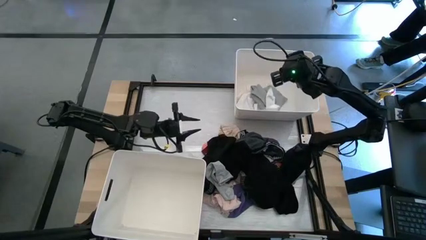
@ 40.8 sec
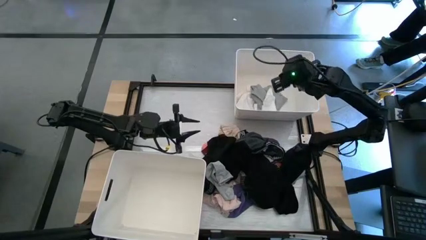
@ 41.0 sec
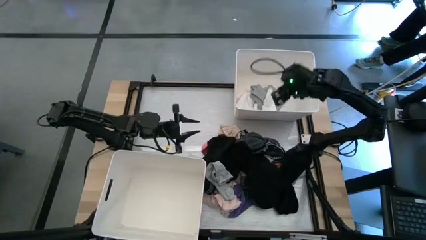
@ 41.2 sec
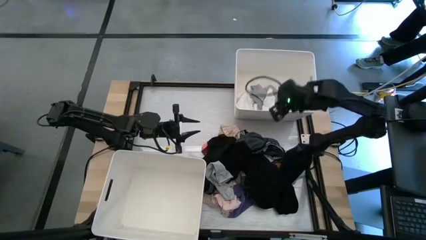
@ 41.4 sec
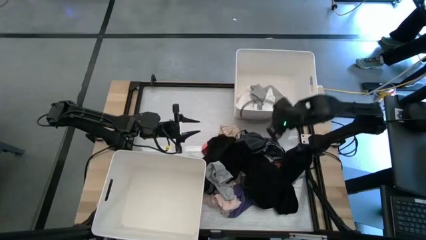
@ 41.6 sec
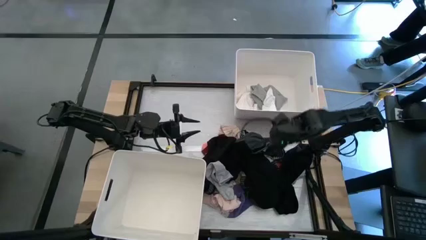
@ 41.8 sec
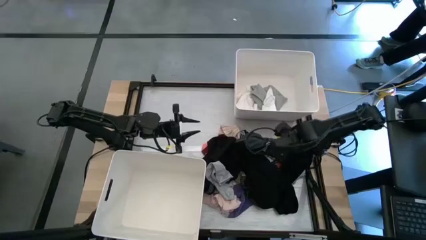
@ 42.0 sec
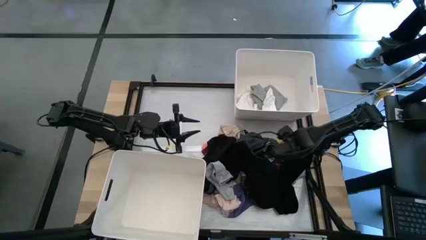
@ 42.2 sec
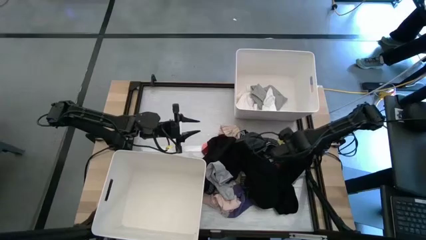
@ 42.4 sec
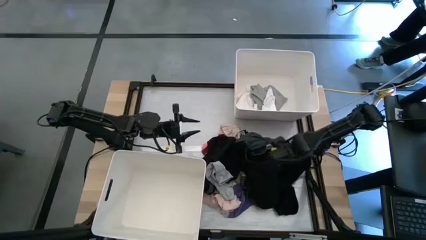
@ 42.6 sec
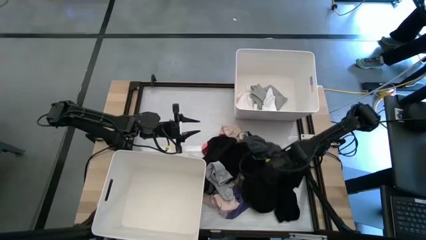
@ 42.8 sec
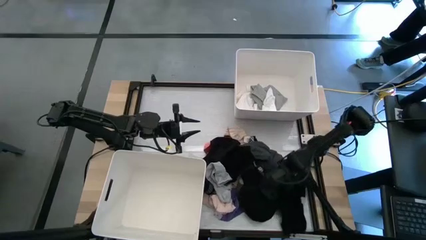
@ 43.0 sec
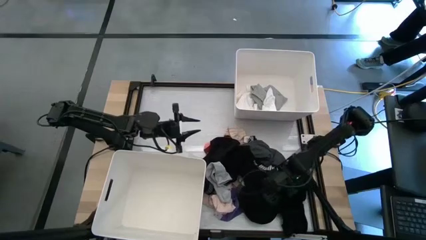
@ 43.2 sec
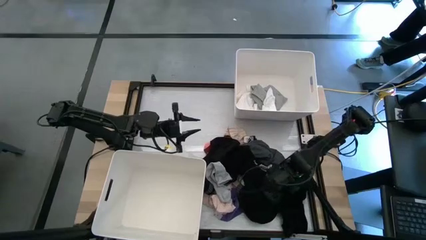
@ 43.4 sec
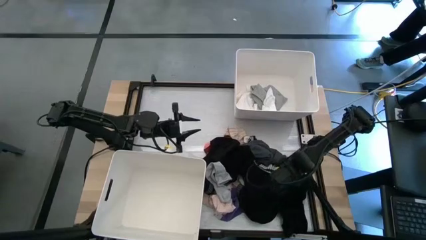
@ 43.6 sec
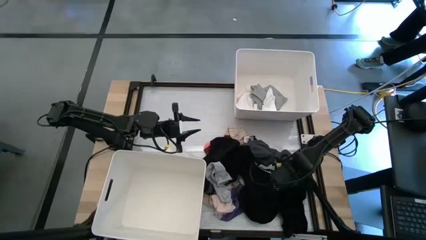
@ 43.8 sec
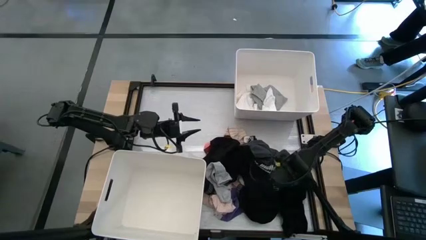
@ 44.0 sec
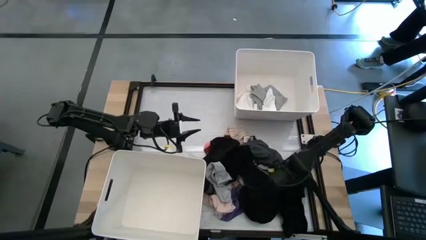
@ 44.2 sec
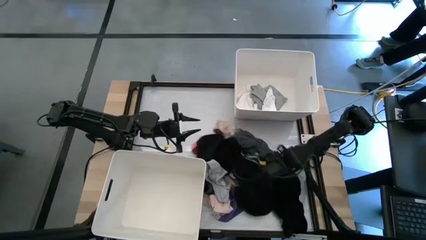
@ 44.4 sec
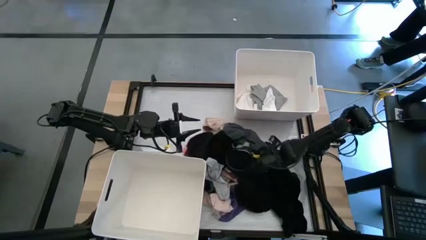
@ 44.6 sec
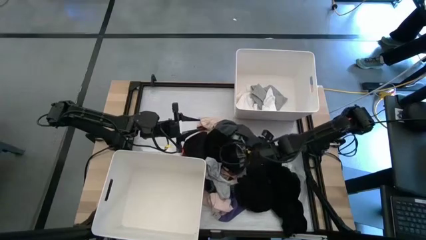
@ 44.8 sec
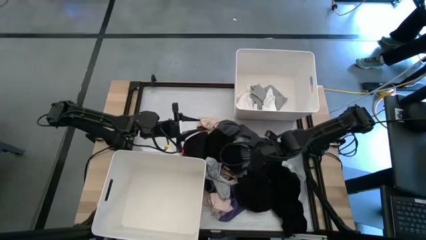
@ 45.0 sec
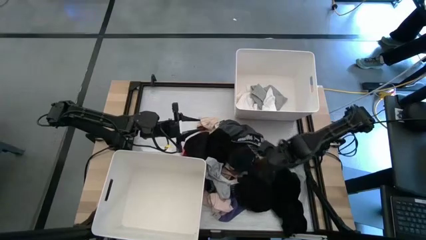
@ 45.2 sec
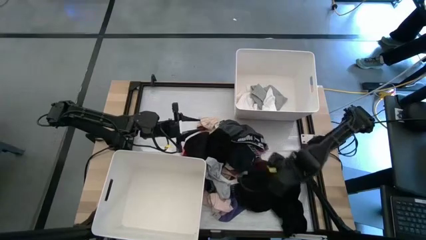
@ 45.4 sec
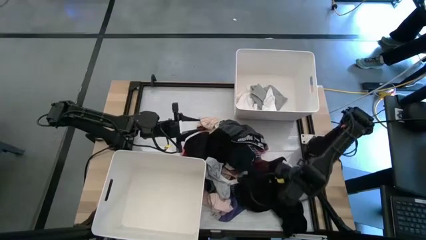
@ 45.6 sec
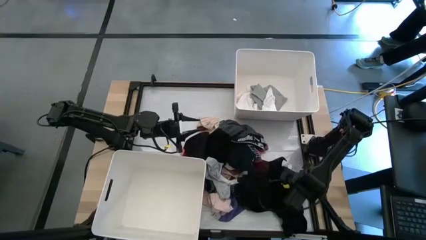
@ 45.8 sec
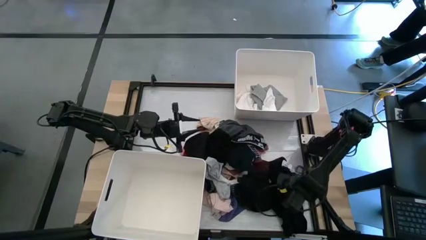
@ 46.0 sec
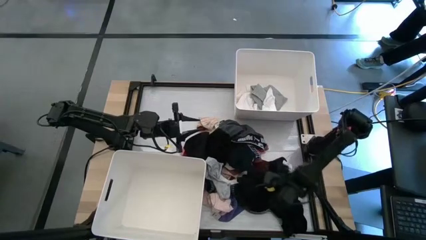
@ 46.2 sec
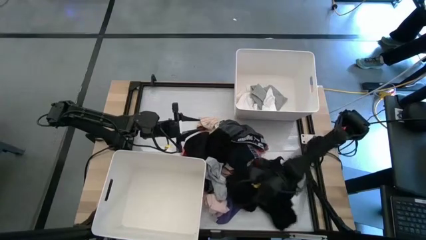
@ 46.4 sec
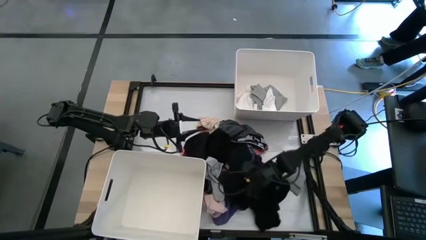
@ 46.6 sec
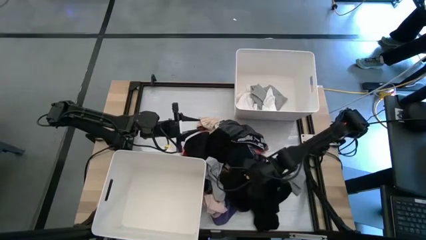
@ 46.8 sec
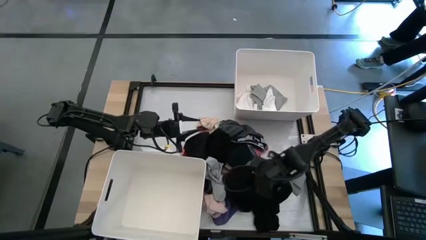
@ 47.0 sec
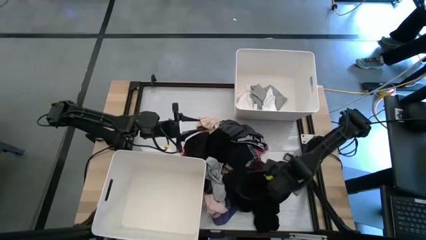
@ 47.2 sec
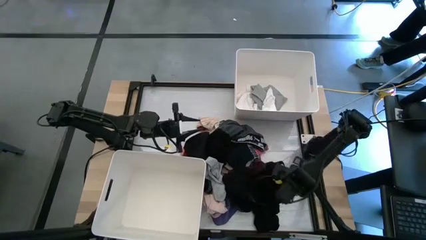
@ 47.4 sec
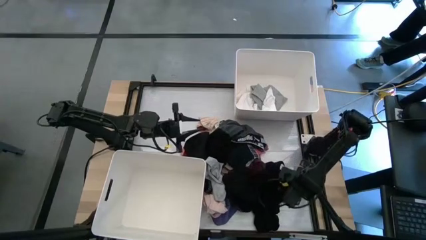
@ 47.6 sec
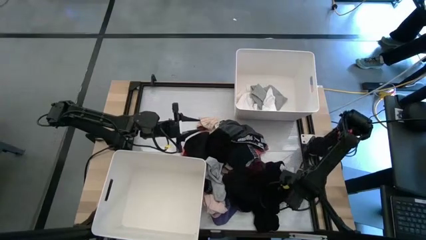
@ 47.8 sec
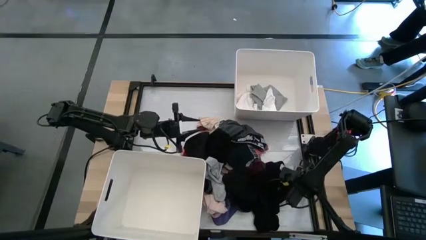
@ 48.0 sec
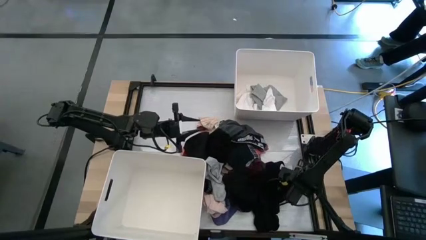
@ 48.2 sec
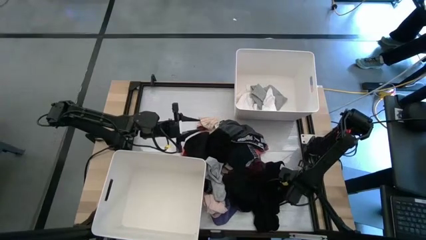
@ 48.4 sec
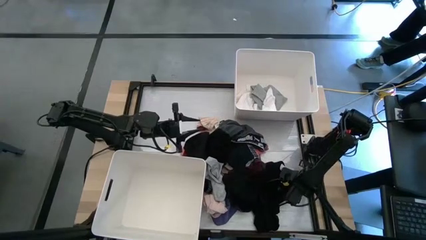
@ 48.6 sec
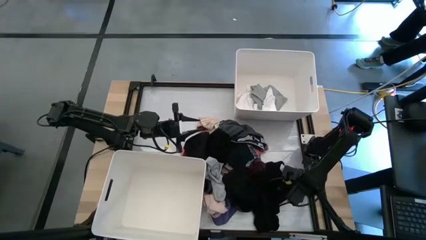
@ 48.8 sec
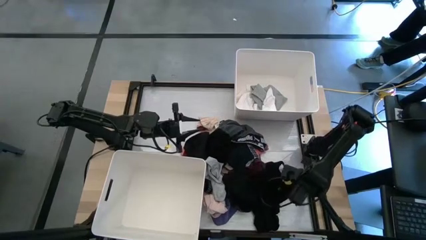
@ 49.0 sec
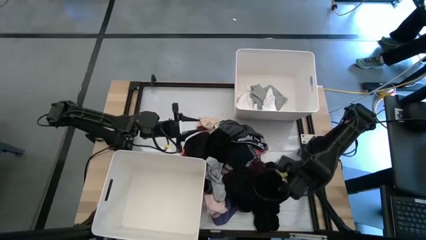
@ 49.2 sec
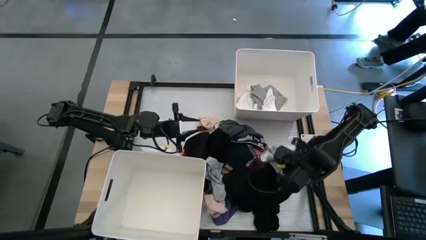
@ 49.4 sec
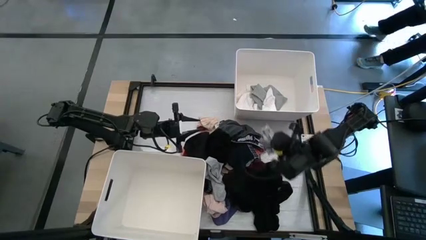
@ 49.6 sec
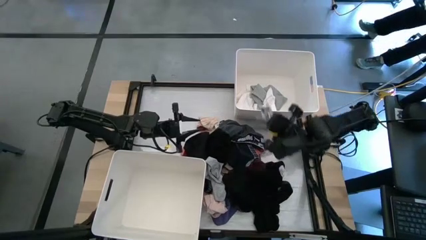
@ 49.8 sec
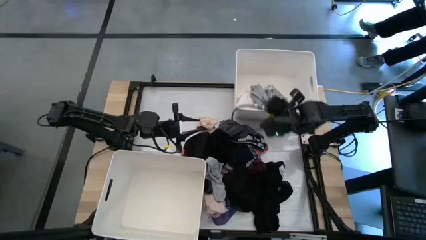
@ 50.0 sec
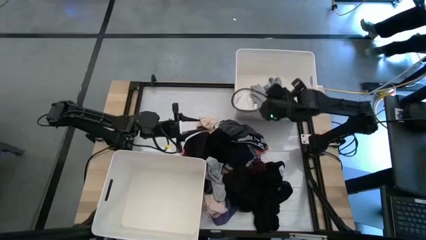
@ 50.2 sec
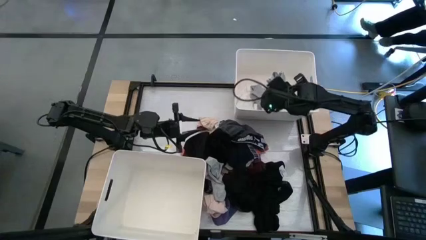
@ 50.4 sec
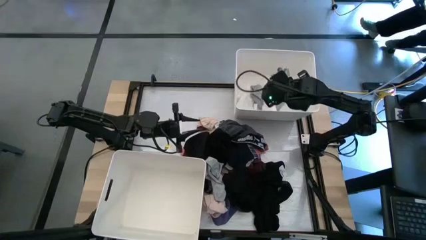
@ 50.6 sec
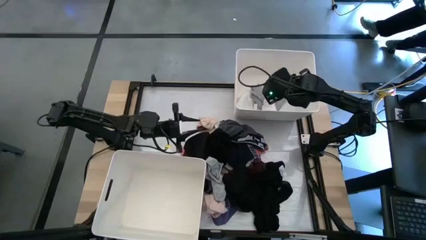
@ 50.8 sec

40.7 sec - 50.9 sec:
Task: Sort clothes
Put the gray sock into the top white laundry bin

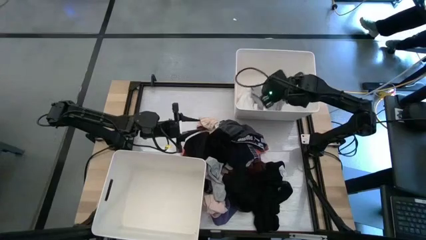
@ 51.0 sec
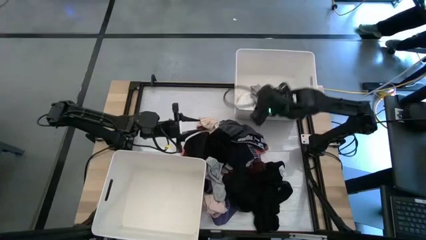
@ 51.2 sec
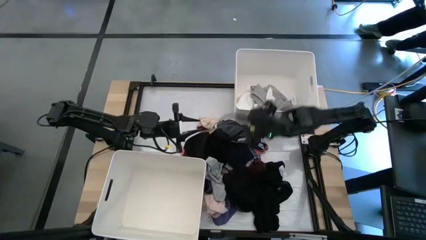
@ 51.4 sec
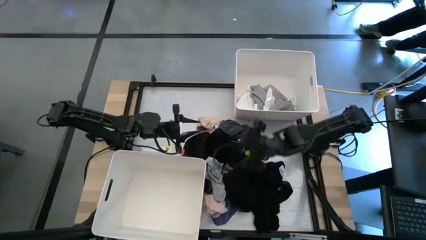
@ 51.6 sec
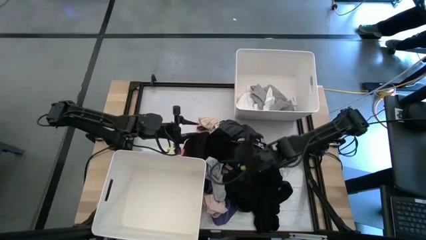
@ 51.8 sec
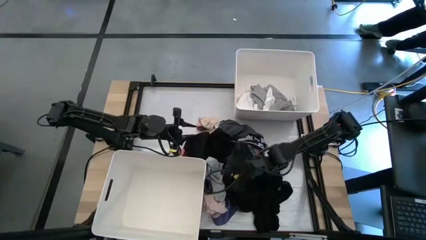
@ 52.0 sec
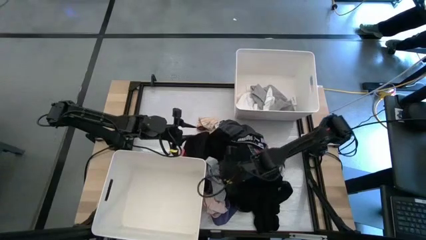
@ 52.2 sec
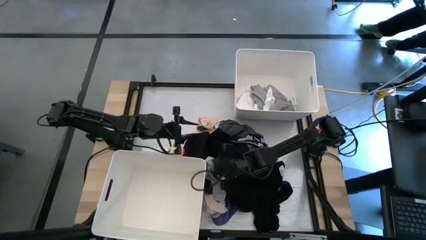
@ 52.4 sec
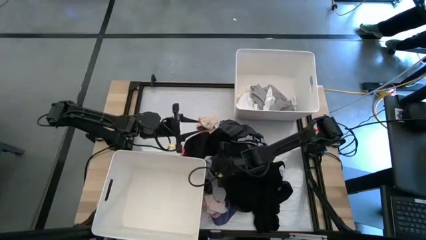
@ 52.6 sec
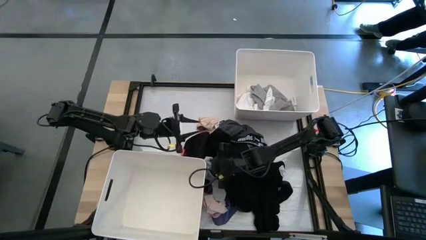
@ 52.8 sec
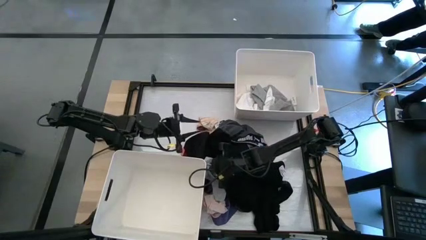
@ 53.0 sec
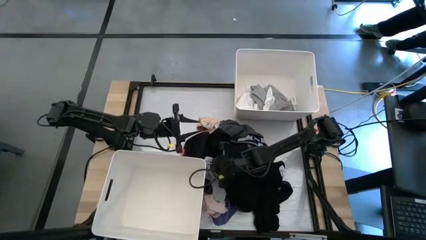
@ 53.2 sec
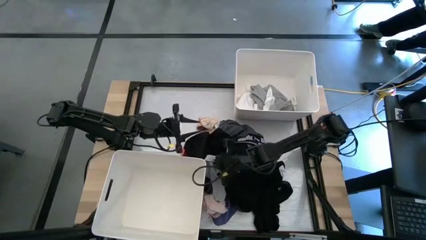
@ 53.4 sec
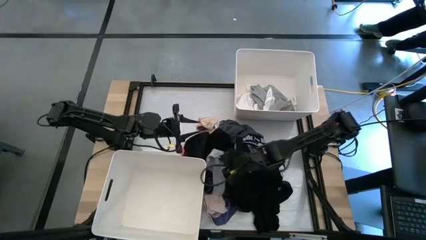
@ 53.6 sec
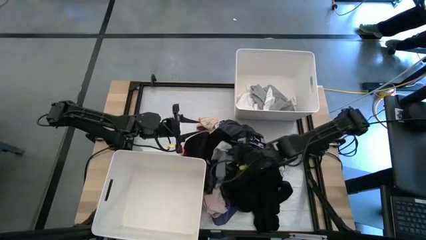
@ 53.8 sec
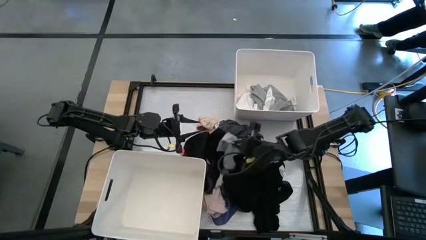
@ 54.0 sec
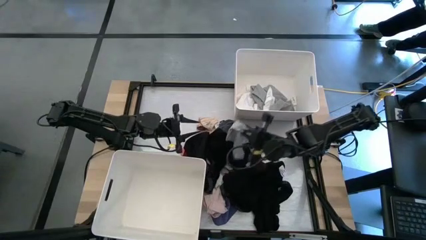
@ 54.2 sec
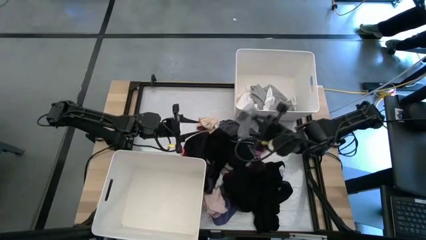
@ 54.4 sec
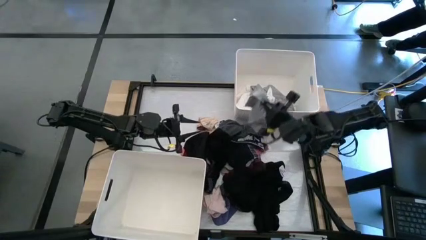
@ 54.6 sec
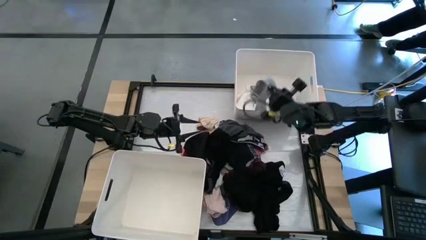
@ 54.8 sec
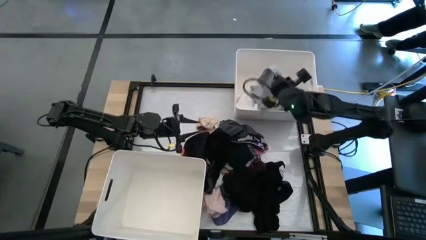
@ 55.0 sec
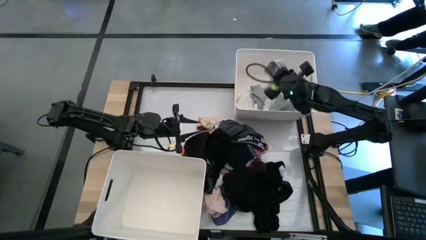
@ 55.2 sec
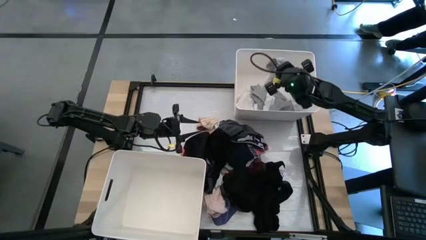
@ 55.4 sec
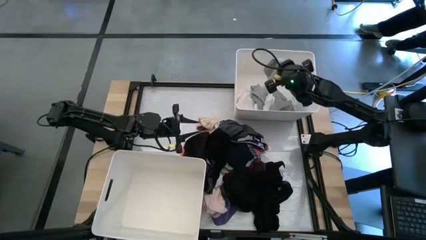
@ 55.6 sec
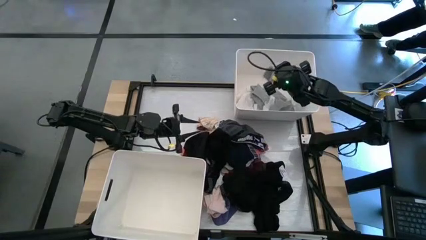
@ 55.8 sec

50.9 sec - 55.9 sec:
Put the gray sock into the top white laundry bin

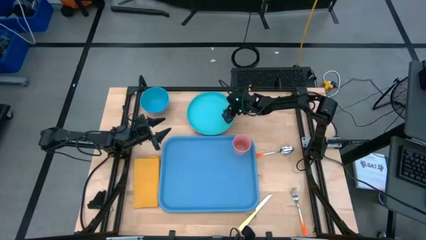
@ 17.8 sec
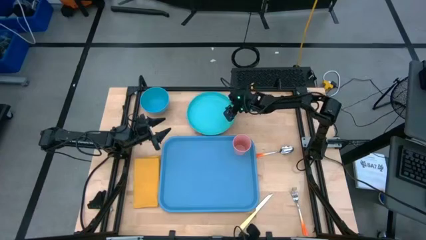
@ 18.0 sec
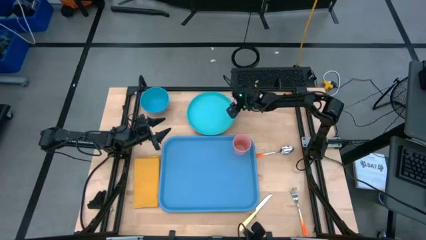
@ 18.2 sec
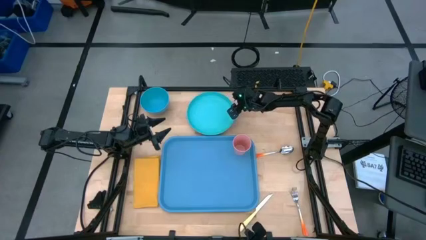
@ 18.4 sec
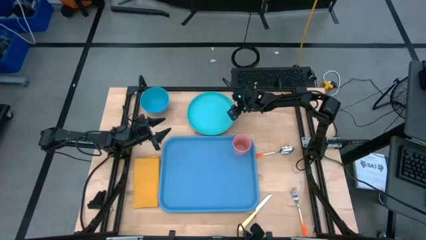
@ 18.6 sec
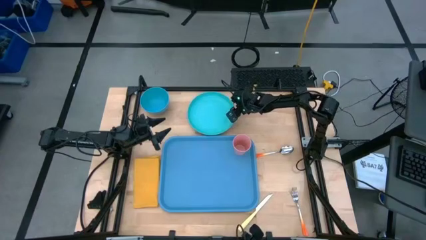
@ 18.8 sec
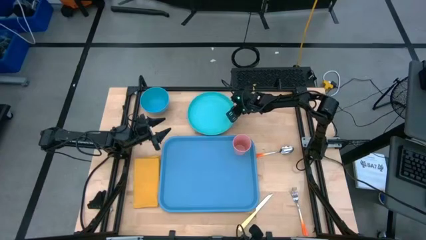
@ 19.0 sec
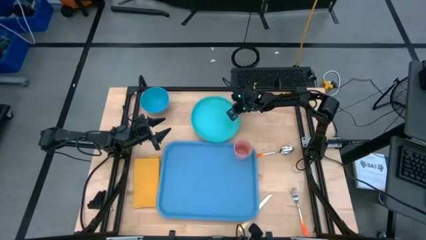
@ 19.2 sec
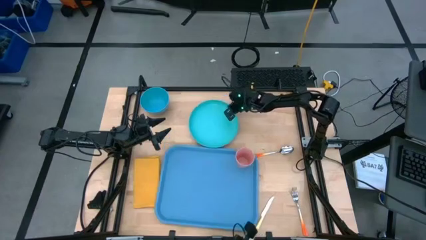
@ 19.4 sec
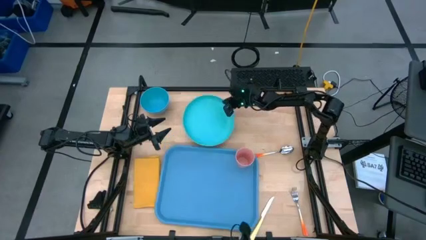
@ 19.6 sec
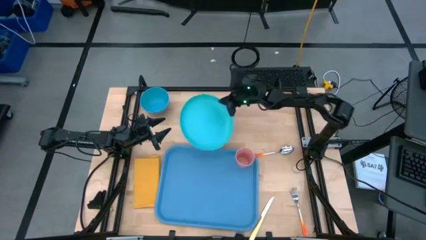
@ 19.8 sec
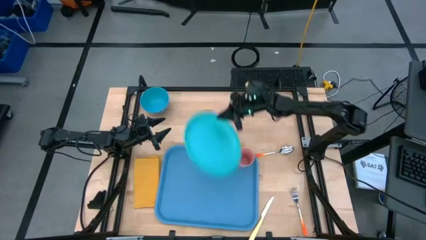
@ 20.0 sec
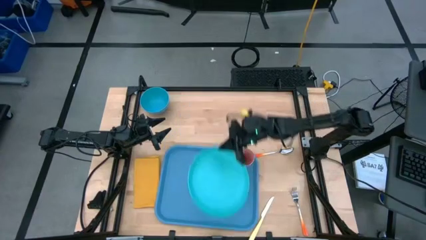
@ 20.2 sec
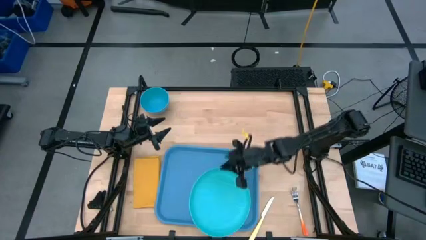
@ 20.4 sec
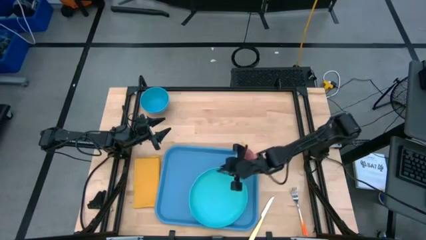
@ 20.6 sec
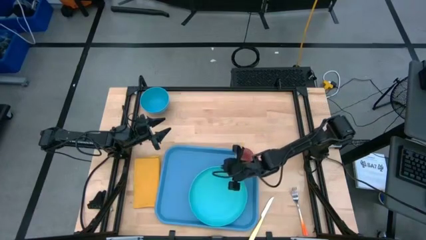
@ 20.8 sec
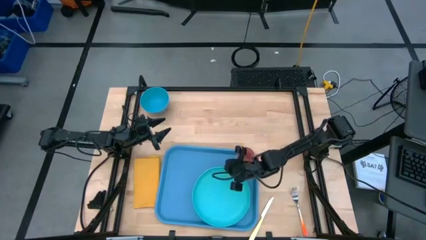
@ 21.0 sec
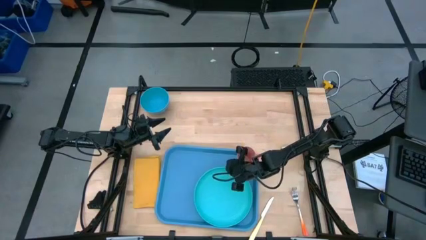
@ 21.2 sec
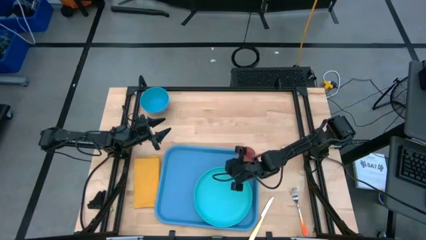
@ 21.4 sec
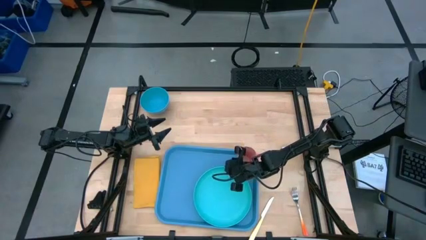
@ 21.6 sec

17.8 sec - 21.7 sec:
Task: Set up tray
Put the blue plate under the pink cup on the blue serving tray
